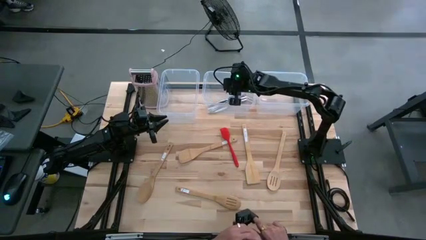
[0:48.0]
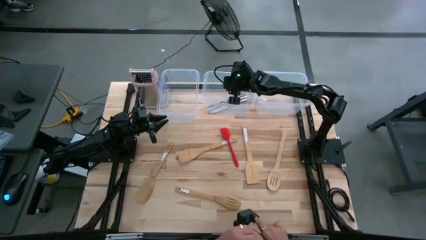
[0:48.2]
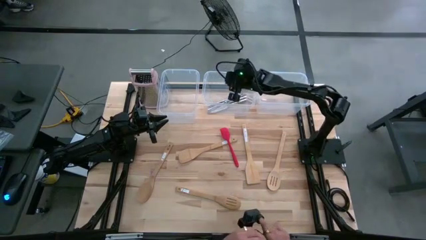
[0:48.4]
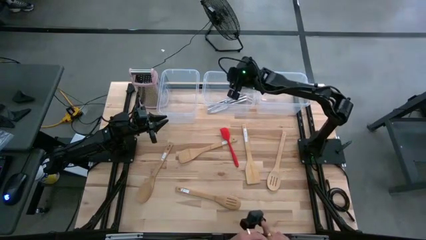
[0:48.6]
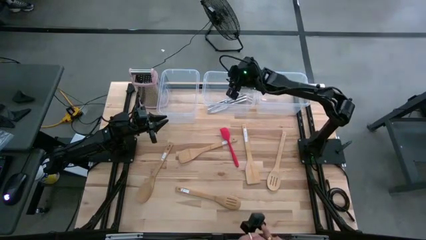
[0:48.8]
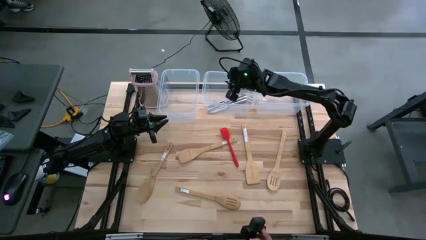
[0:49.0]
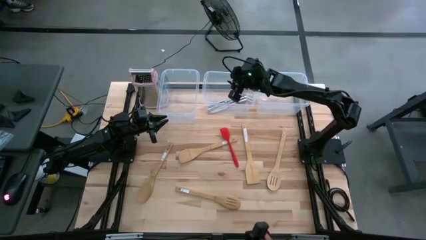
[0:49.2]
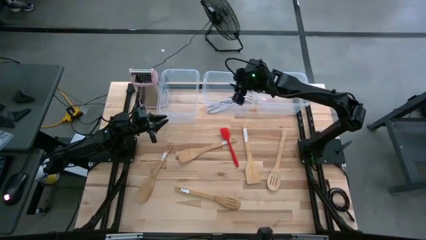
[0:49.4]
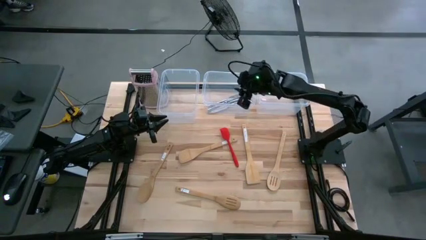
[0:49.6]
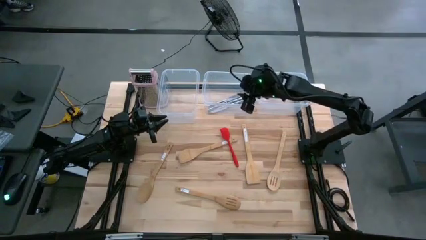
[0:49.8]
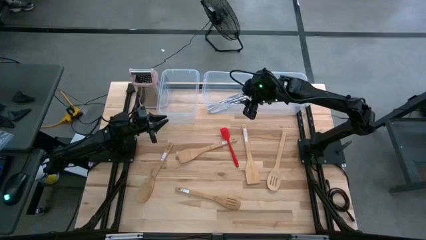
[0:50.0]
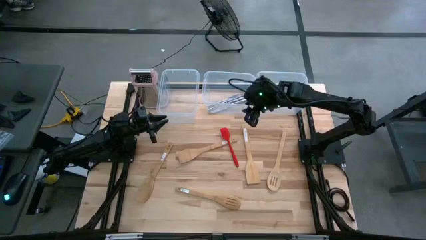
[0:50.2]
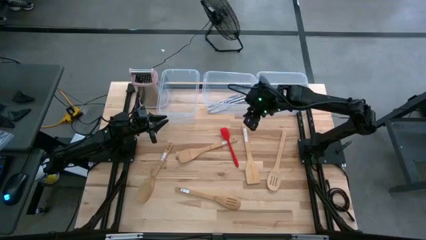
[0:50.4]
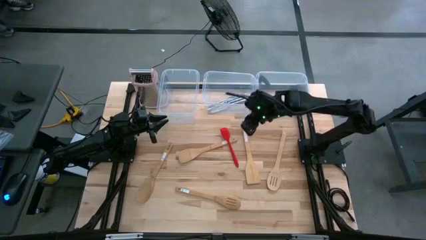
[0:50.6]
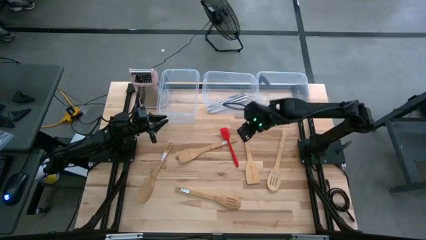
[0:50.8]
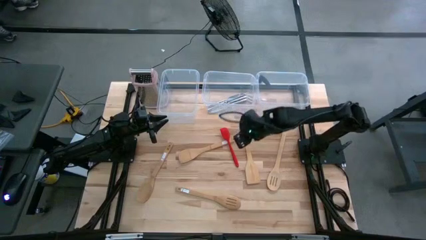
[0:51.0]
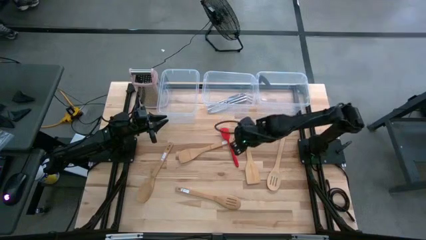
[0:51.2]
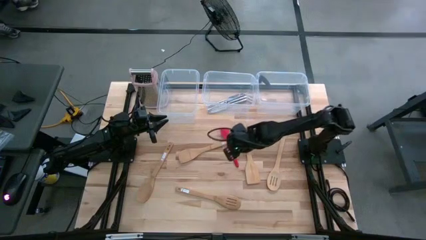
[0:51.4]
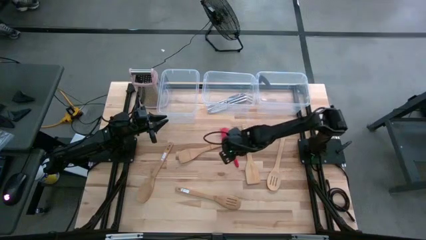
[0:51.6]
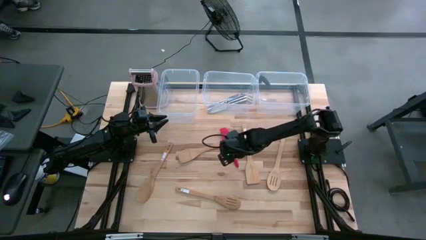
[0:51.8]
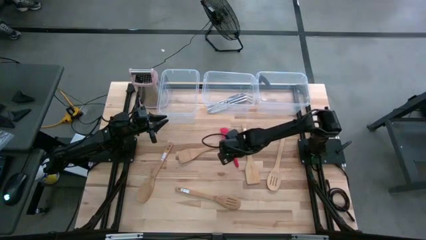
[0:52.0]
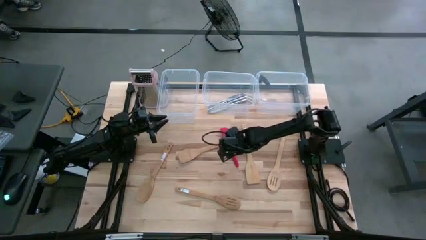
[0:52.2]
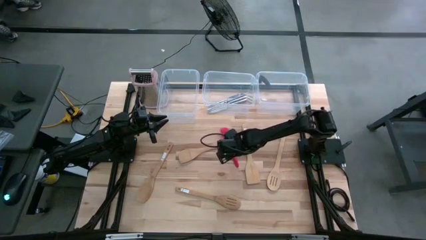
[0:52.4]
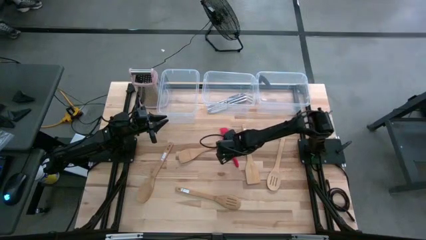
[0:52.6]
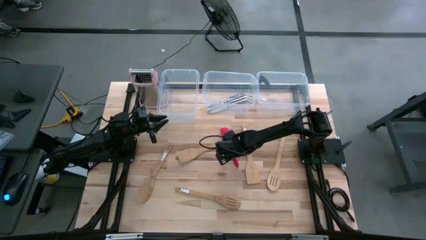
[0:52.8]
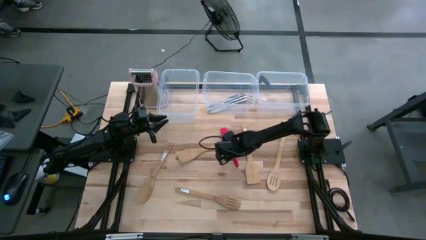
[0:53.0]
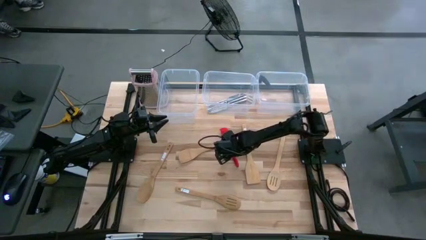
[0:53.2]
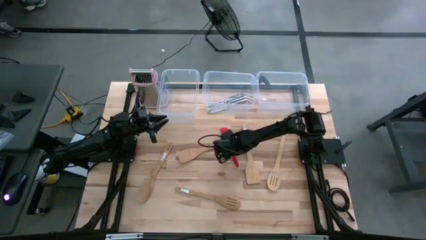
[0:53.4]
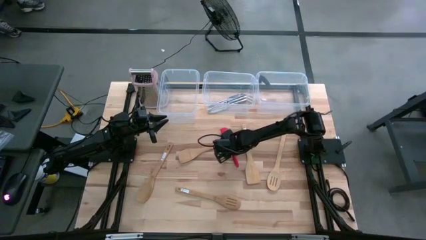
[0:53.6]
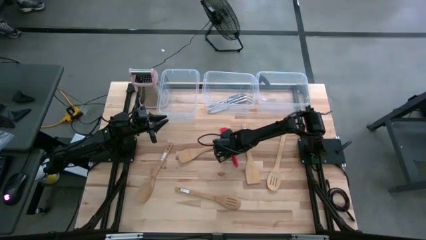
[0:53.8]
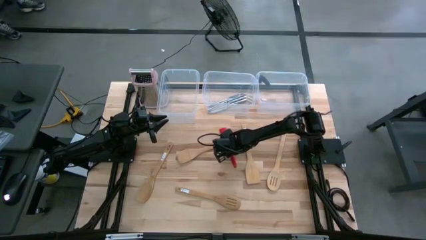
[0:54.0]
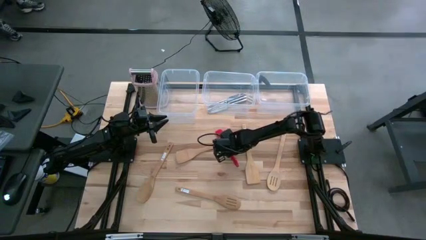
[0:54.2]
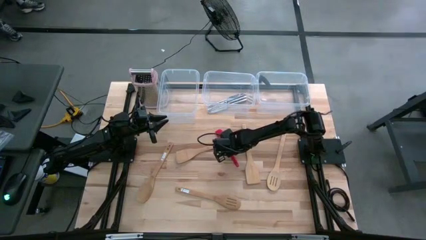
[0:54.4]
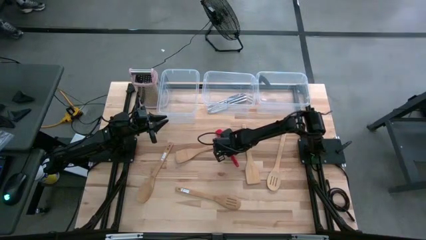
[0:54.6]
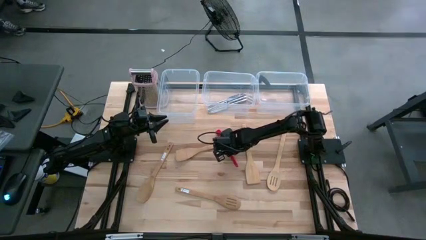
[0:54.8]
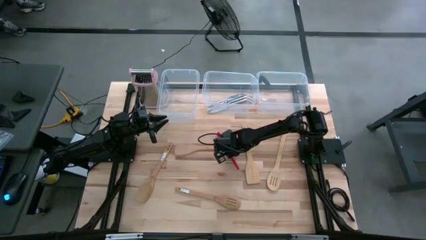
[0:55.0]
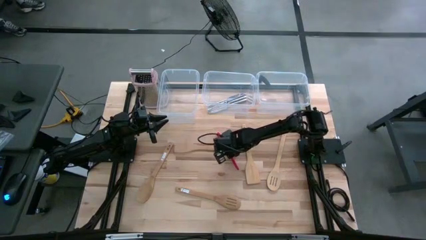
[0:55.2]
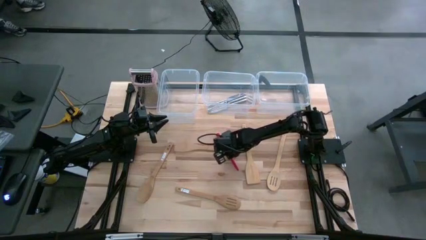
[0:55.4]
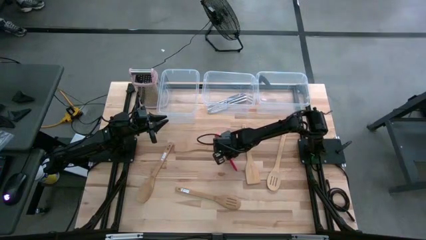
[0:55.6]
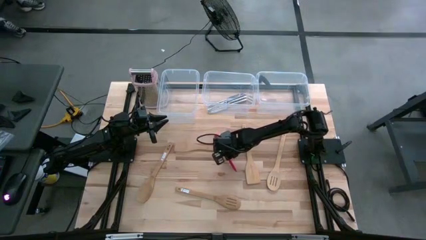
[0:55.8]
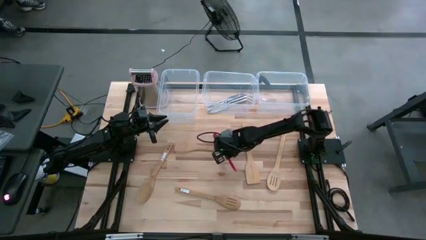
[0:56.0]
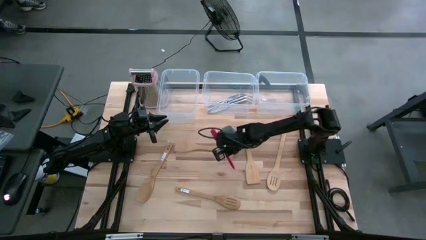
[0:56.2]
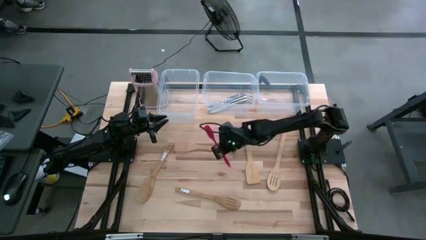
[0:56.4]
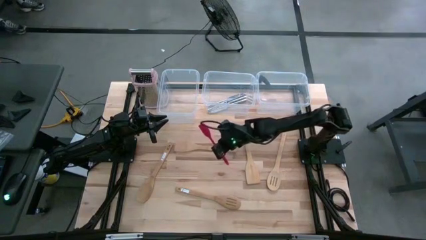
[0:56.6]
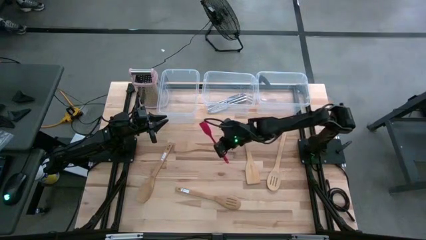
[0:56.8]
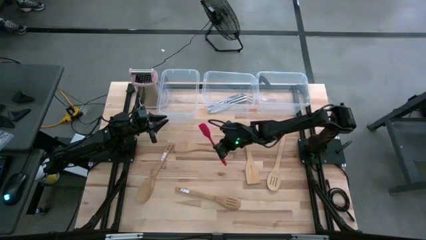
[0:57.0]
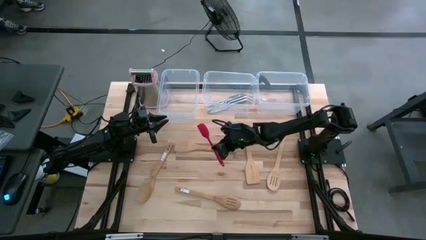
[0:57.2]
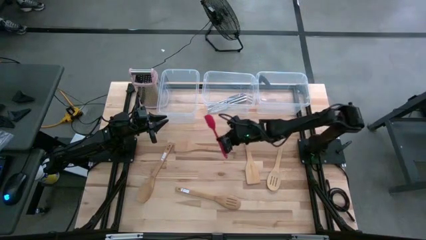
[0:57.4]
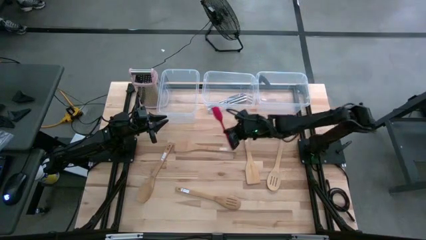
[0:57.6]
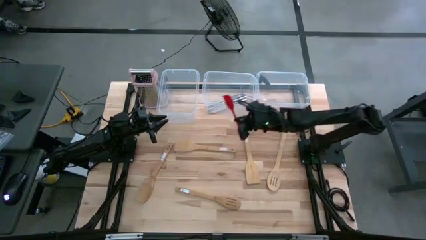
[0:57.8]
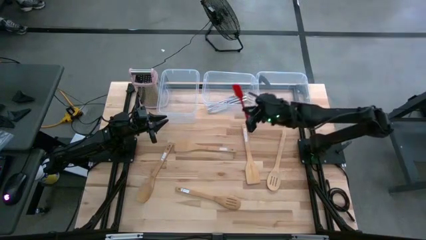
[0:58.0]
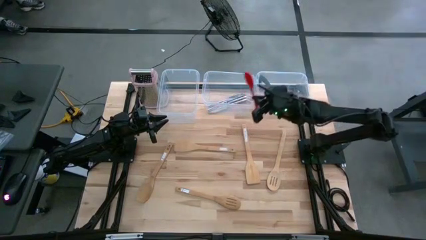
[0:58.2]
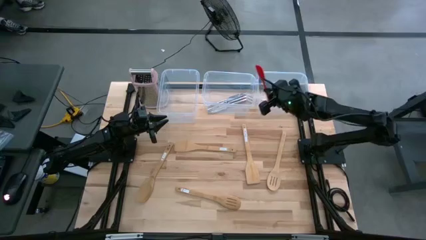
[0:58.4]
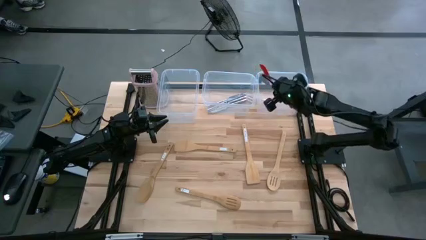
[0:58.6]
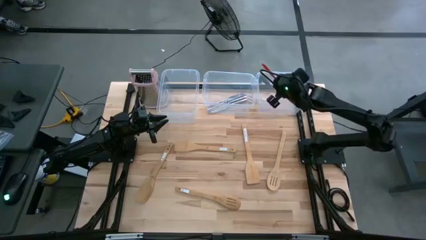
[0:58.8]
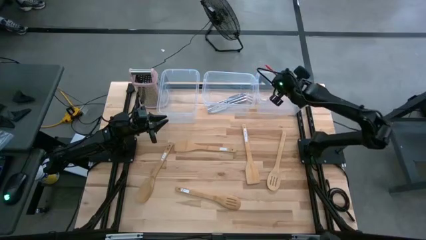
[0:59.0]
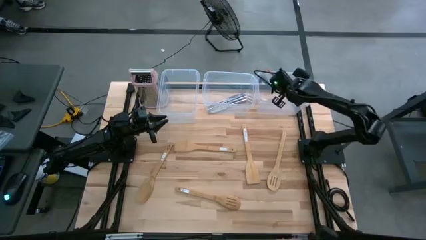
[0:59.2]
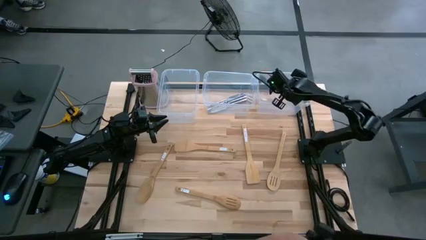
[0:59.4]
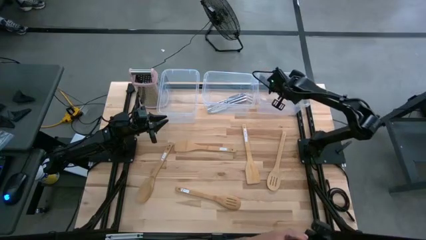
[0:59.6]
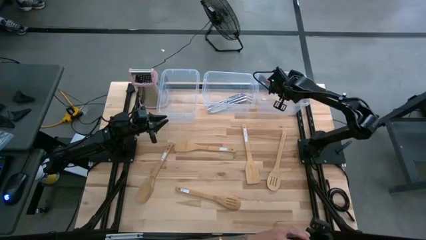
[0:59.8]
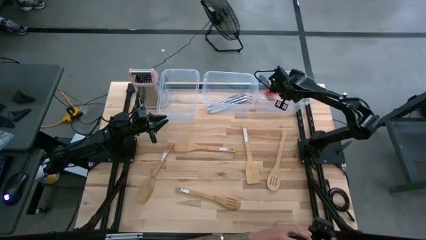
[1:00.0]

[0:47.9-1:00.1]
Task: Pick & Place Kitchen Items
Put the red spatula into the right transparent container
